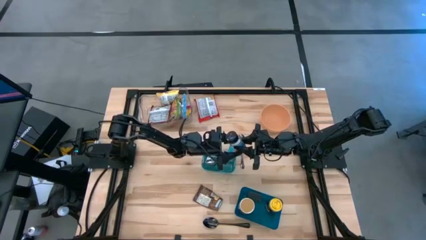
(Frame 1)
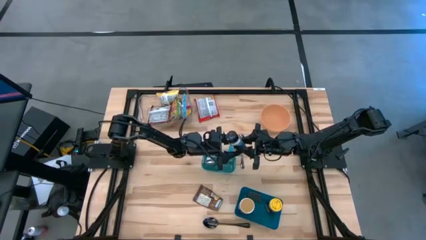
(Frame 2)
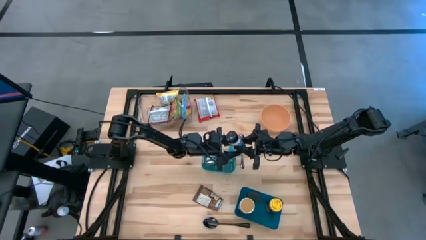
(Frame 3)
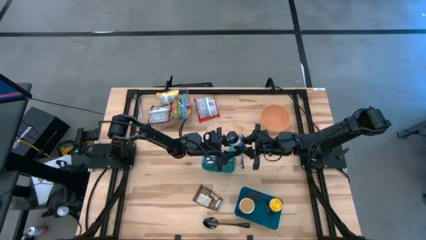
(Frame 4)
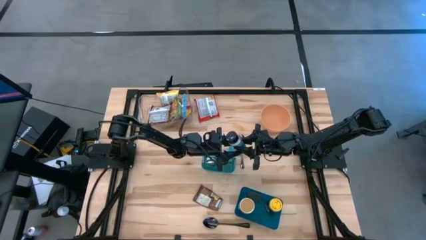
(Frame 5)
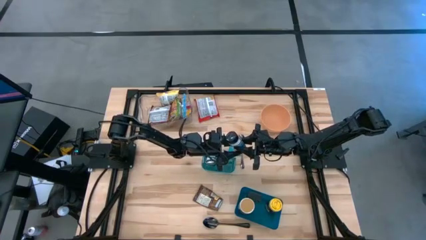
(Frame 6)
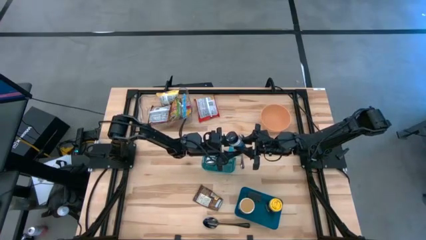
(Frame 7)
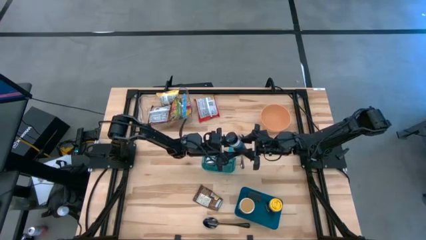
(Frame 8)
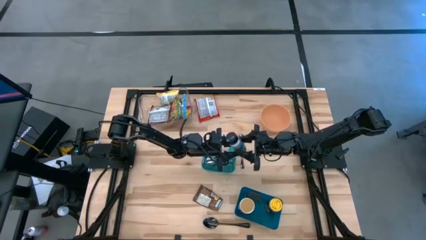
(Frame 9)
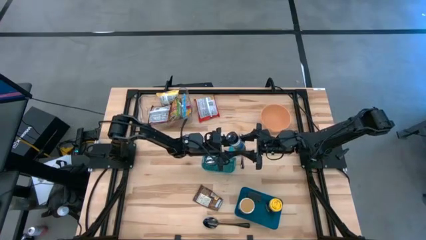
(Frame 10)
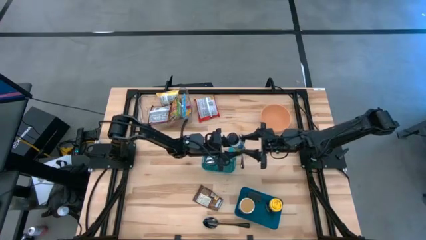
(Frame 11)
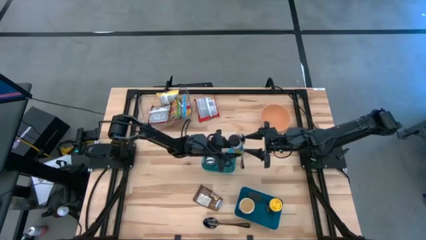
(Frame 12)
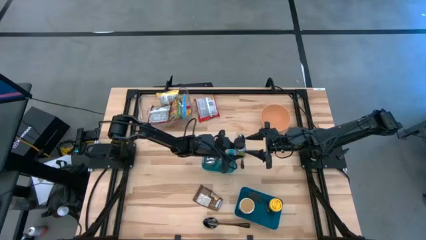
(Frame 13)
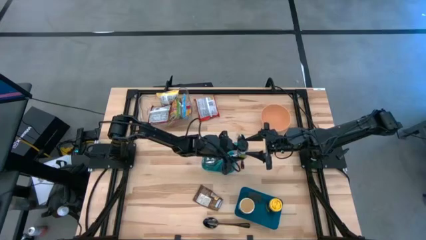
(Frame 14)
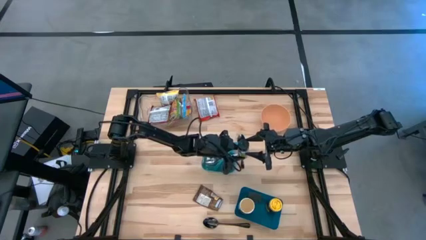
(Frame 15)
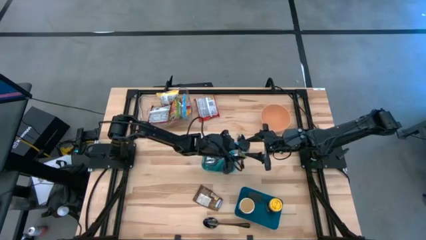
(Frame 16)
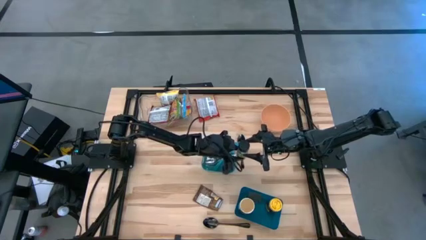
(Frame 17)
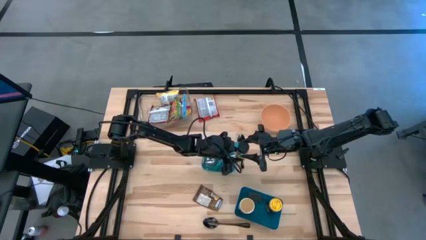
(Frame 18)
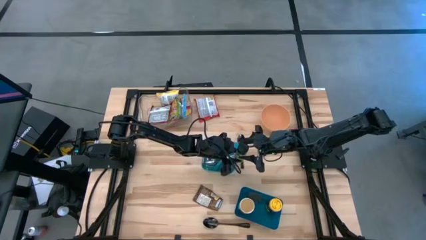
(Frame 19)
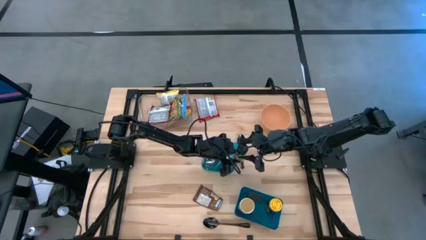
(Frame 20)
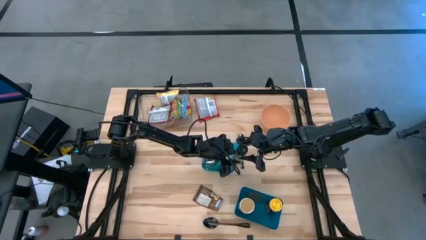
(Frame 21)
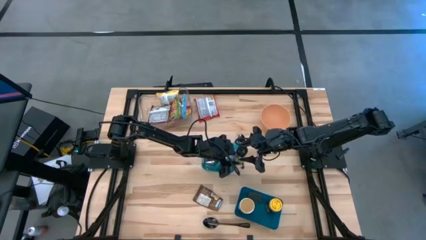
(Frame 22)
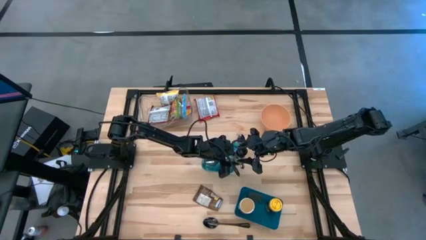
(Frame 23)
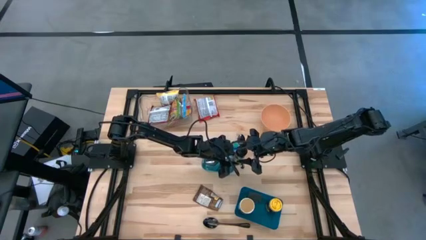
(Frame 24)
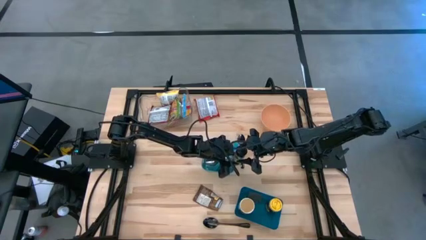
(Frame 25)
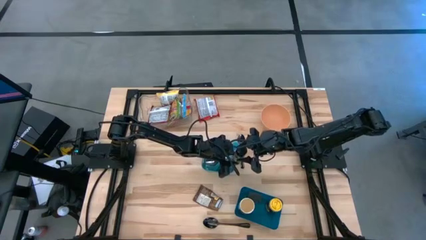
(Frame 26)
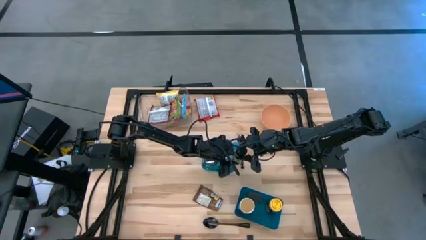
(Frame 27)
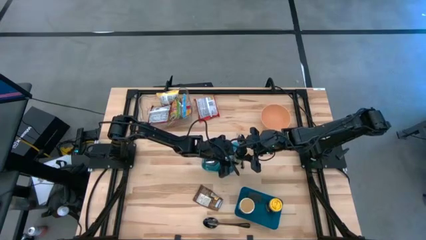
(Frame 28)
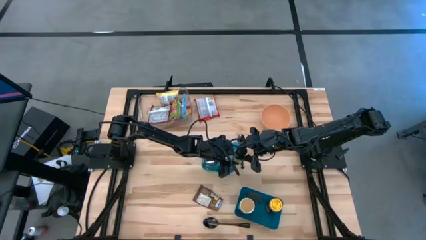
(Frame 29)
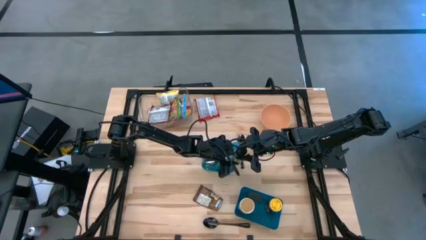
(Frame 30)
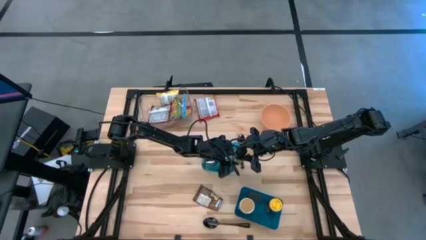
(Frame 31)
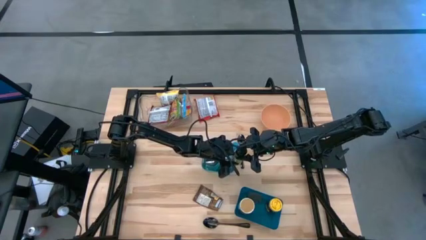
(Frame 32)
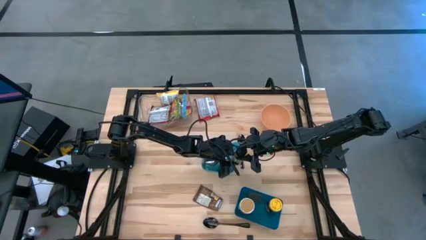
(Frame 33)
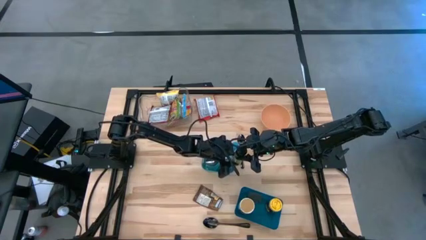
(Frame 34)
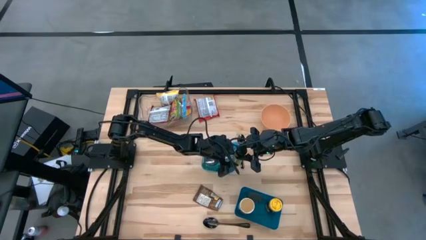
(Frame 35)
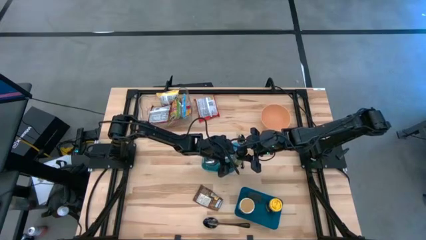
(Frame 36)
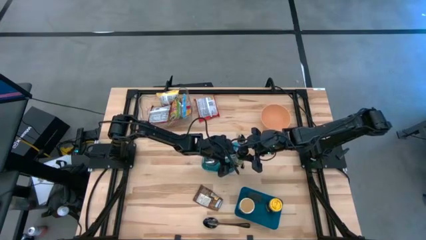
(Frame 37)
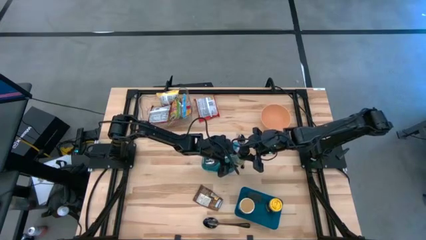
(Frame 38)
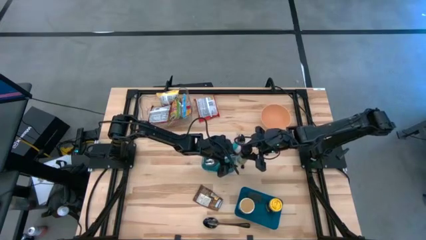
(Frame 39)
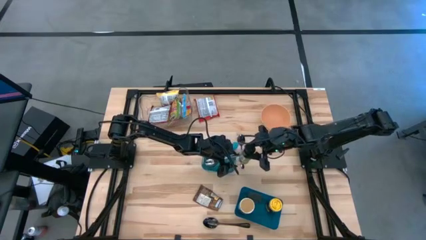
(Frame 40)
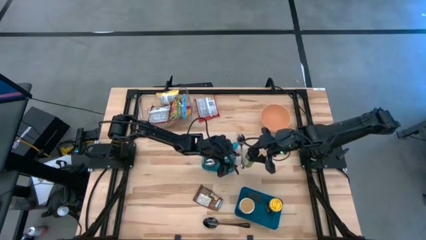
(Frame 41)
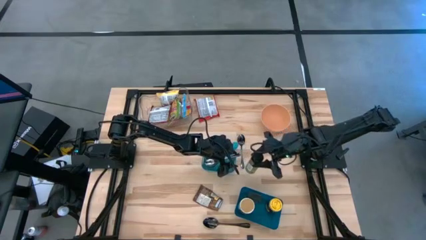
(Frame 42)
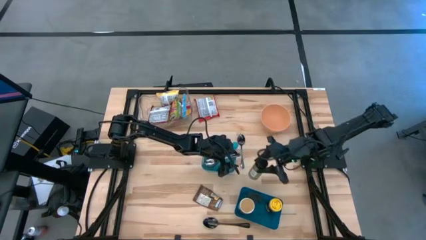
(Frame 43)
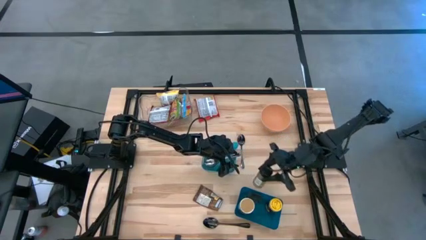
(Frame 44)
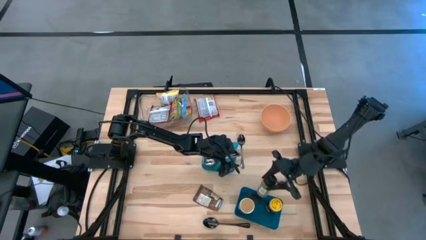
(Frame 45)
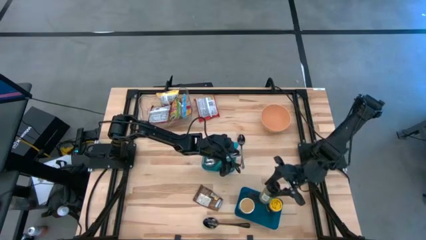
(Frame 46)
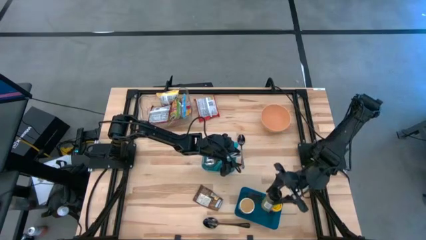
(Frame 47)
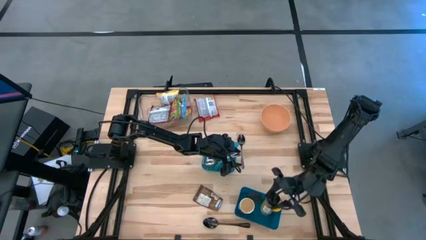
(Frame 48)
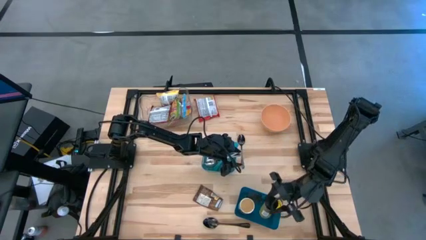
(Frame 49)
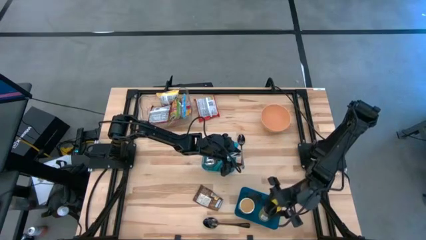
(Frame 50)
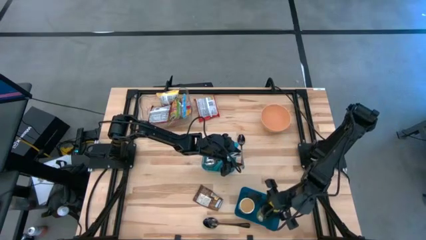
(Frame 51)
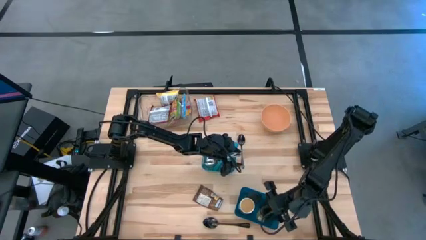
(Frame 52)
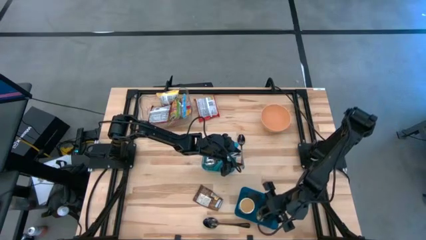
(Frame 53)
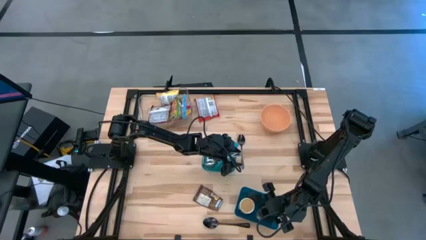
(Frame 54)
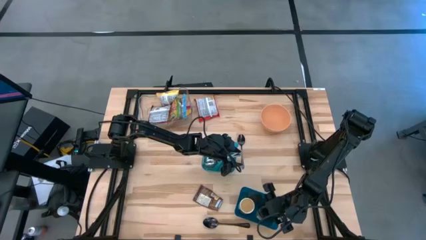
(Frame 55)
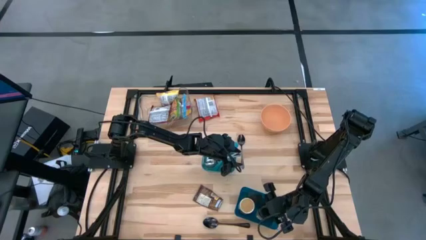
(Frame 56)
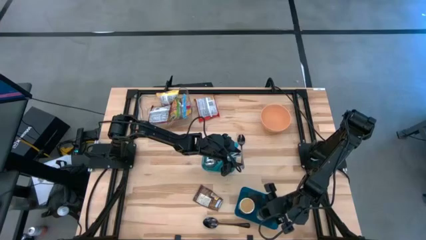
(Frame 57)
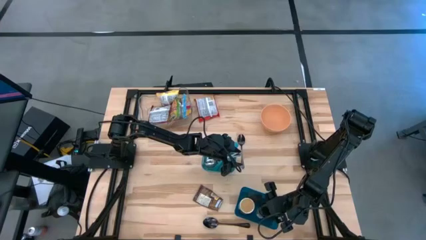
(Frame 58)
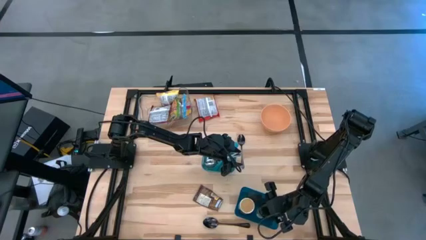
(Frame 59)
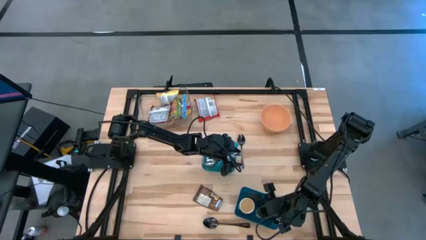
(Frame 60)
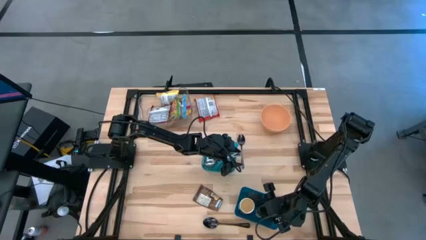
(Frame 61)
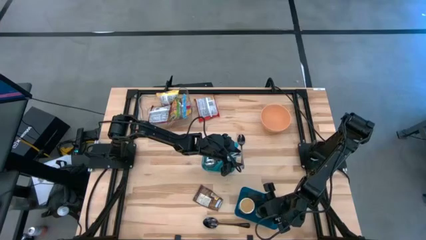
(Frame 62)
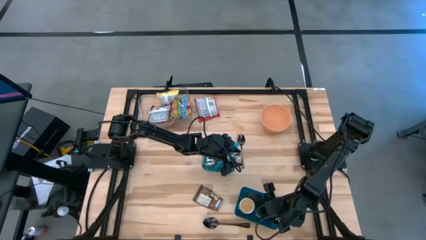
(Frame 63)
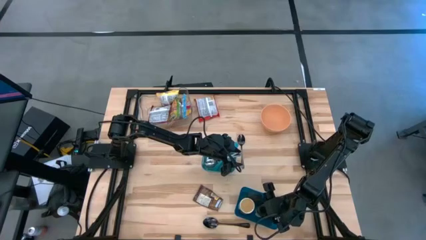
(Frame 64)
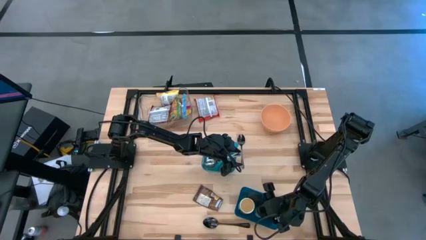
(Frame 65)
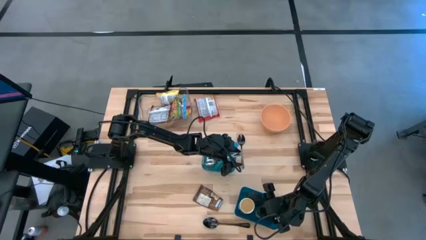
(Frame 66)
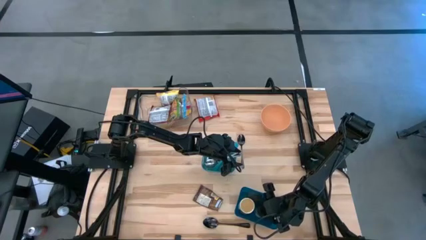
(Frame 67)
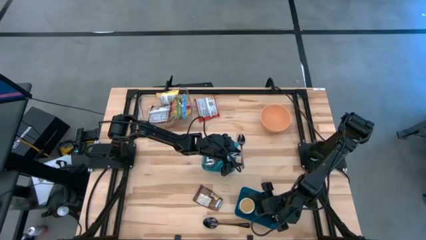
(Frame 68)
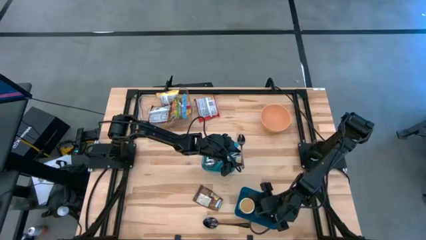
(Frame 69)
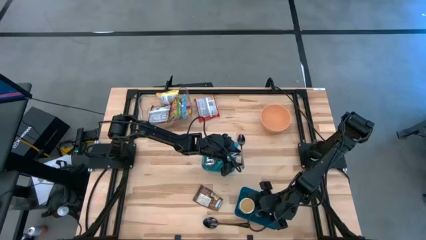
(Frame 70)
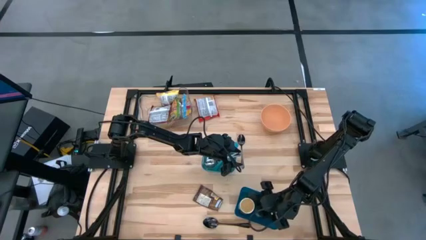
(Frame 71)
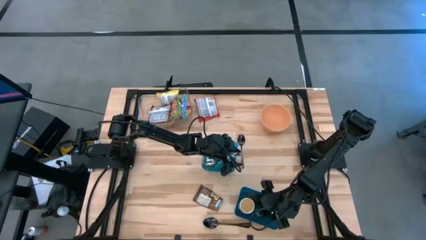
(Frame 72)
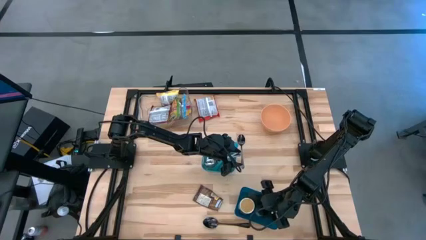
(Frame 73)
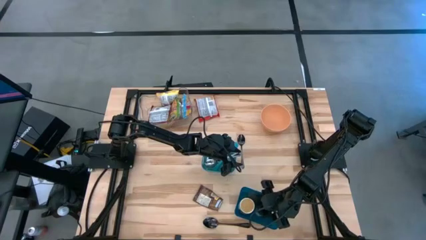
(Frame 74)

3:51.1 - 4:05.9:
Task: Pick & Place Food Item
Put the green seasoning bottle into the blue bin
